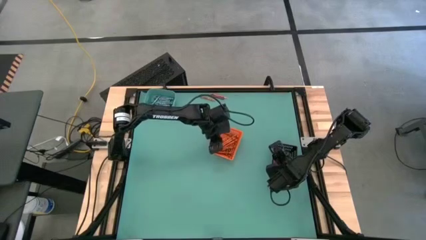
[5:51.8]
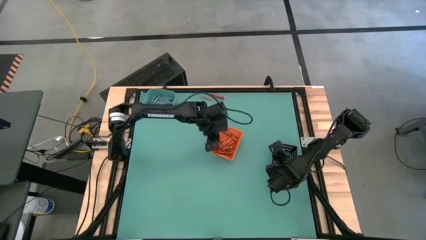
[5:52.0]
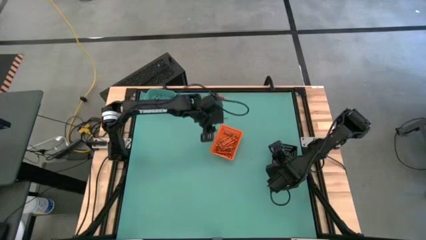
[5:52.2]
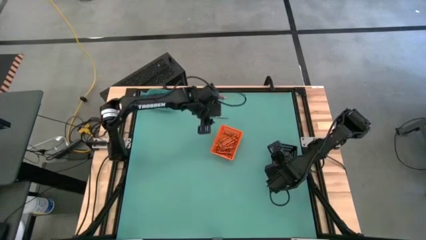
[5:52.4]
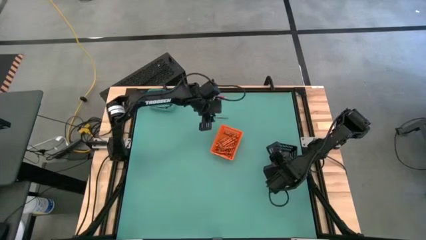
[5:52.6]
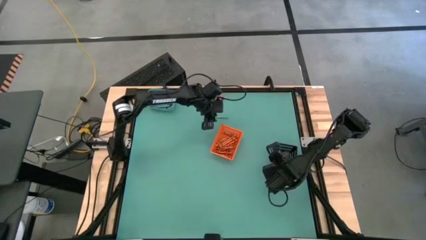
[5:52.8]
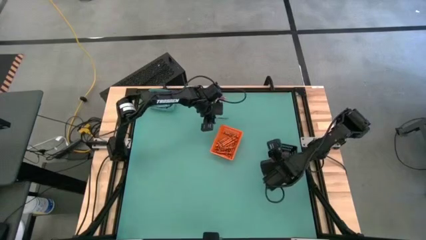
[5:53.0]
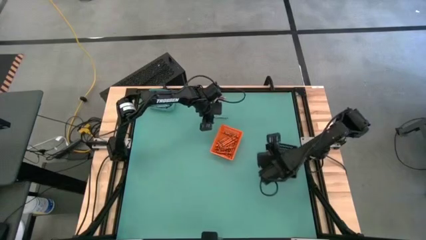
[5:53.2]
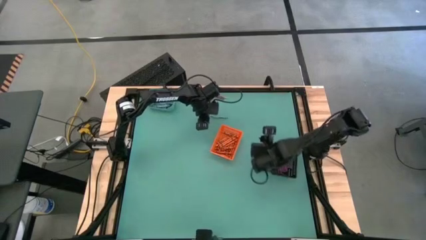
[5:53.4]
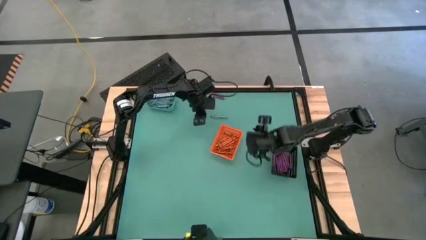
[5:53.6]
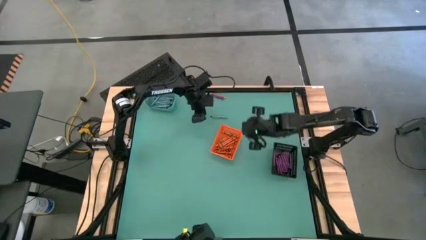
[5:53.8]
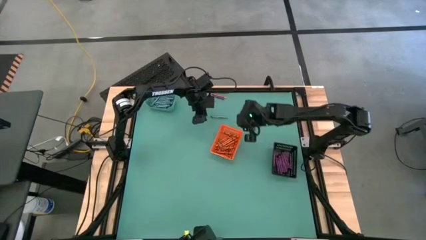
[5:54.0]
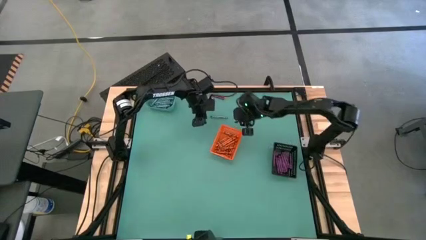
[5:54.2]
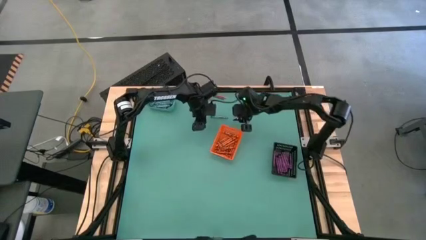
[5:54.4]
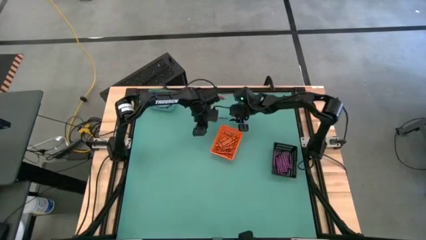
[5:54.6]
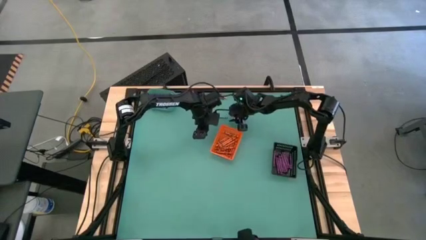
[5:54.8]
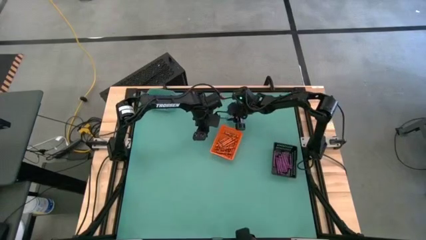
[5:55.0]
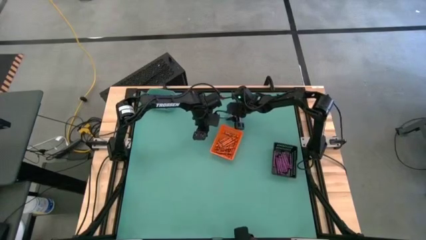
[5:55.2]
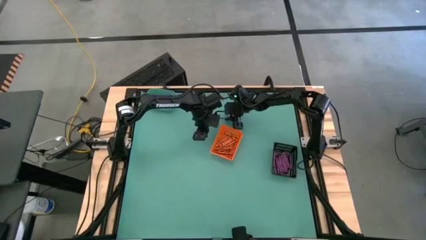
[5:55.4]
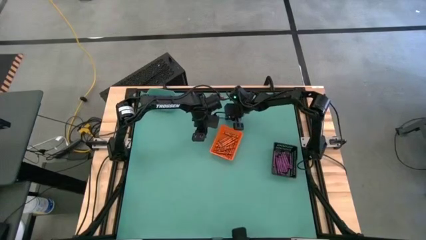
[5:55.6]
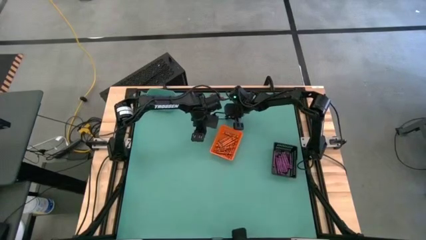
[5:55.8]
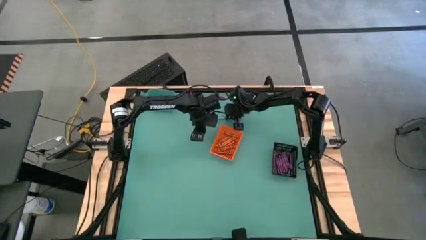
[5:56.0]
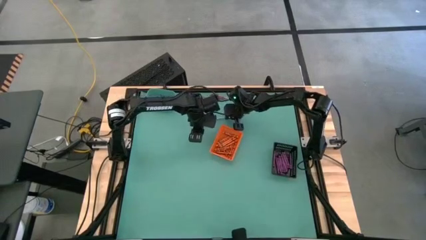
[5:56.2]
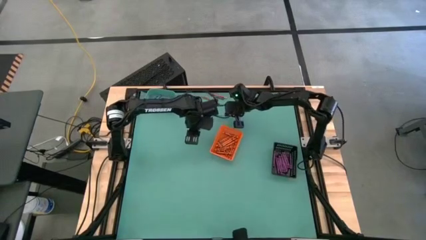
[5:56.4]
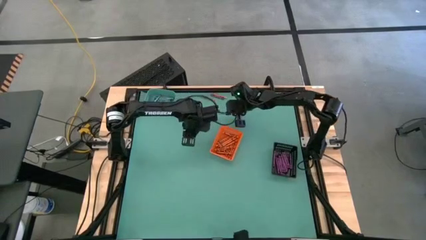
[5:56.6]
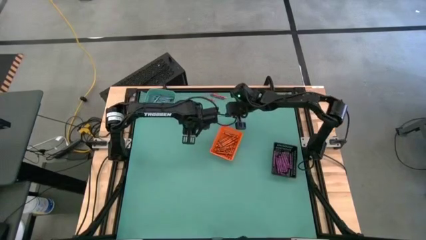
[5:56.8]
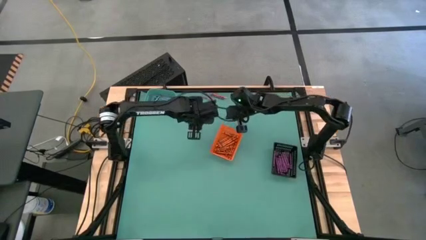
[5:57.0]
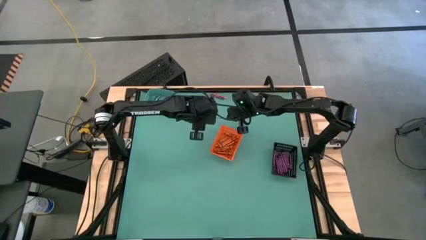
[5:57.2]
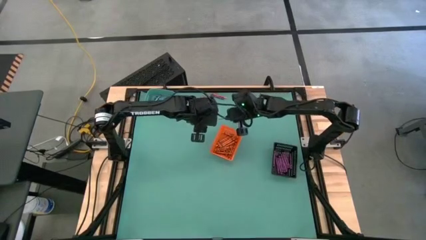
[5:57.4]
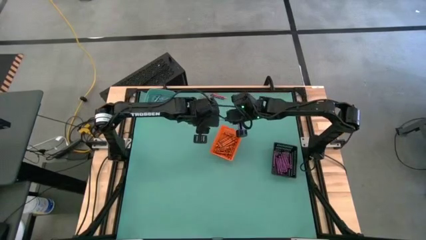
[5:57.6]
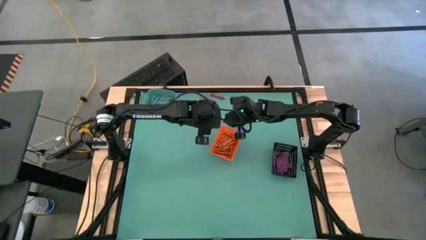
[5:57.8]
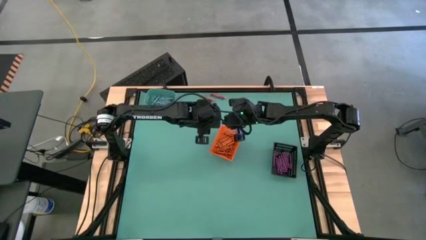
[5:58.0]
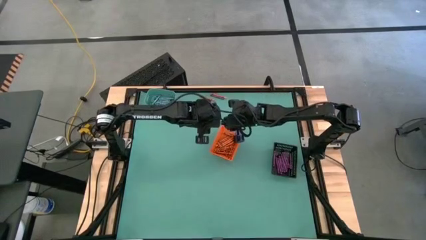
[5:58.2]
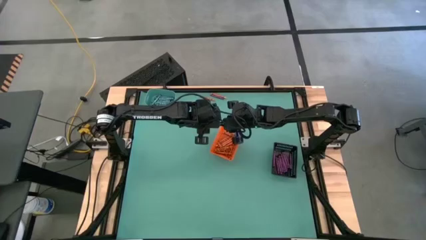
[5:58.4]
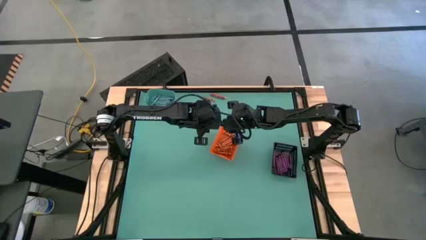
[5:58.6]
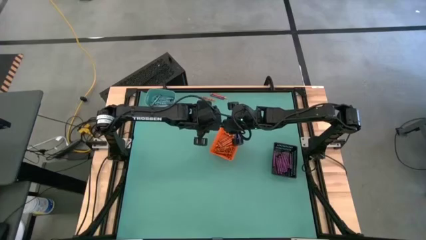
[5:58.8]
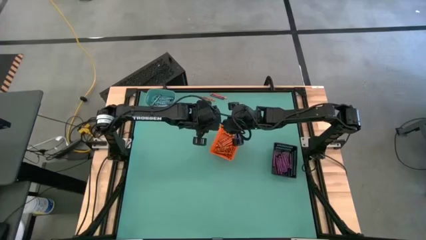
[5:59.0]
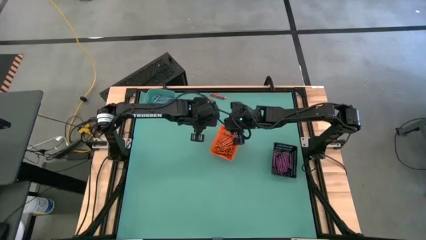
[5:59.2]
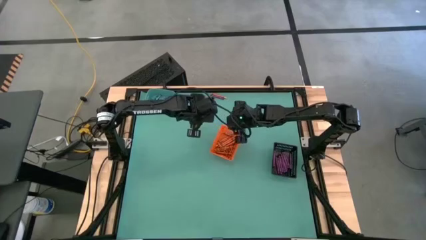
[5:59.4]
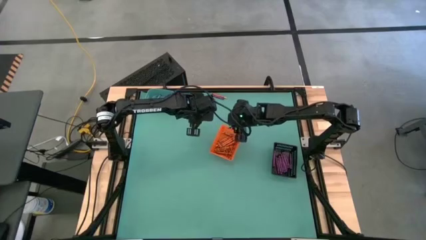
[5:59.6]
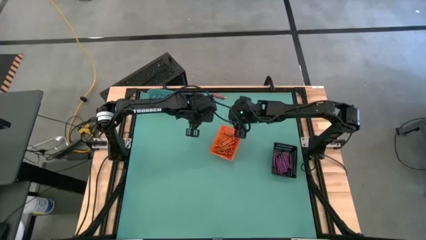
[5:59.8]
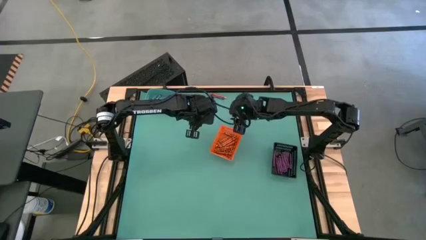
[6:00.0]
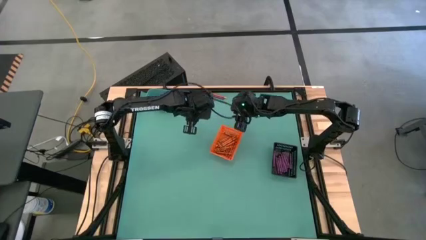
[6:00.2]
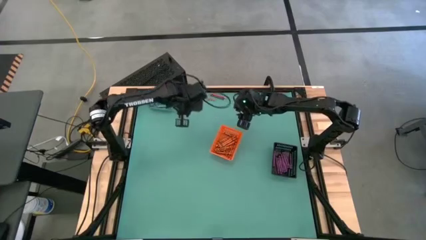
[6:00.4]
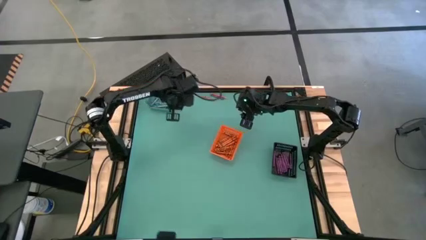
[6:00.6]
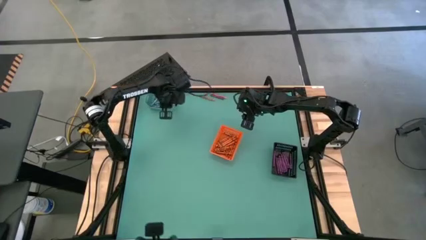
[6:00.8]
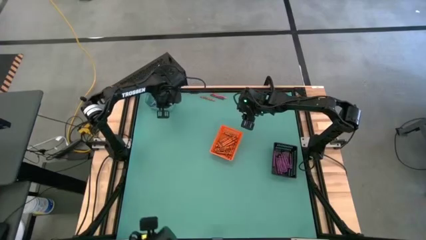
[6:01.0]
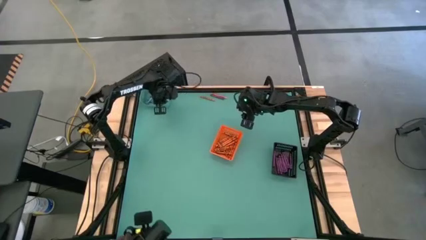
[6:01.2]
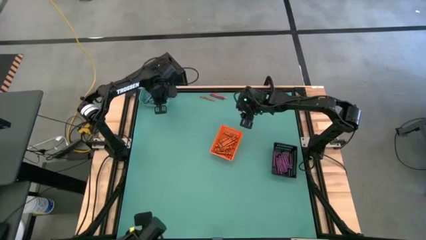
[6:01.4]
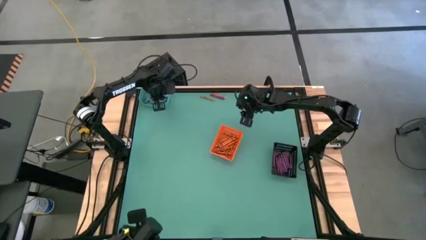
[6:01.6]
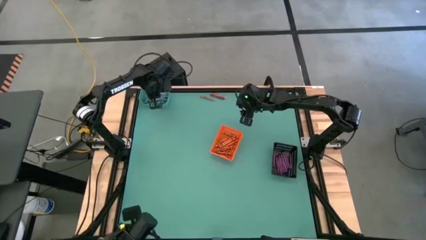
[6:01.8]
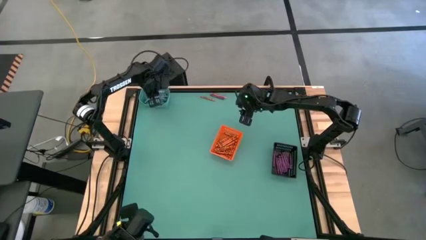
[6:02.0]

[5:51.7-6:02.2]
Task: Sort crayons
Put the blue crayon into the blue bin

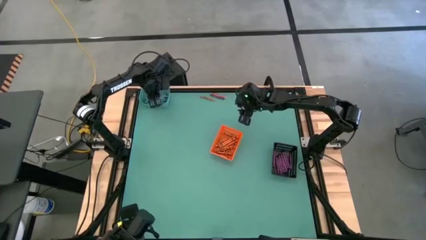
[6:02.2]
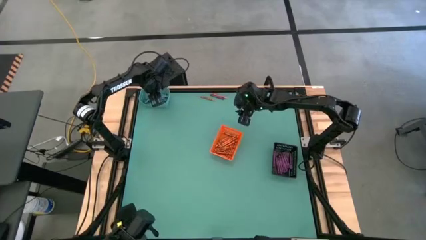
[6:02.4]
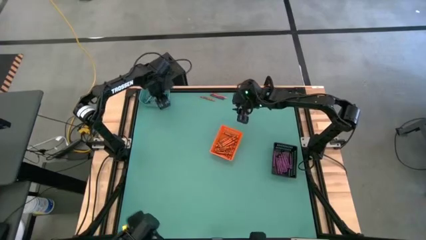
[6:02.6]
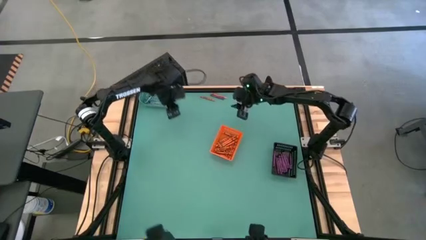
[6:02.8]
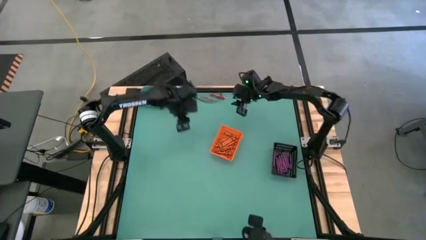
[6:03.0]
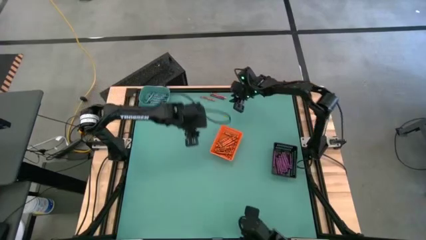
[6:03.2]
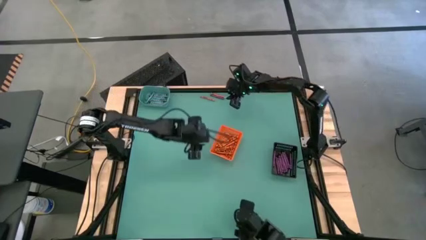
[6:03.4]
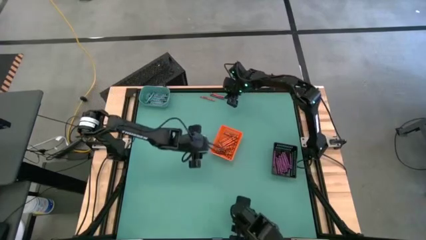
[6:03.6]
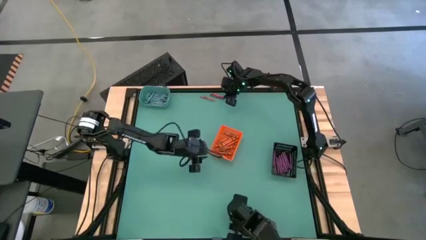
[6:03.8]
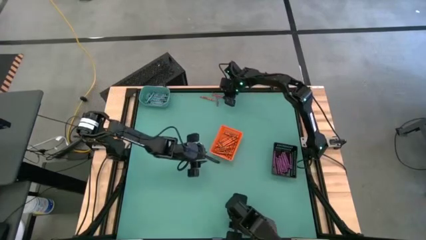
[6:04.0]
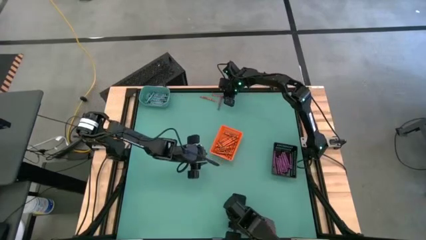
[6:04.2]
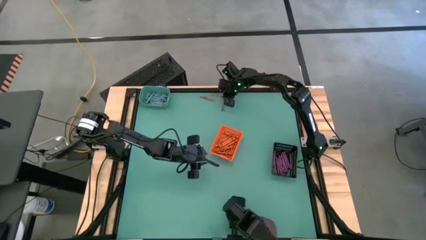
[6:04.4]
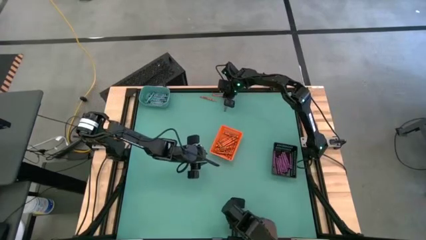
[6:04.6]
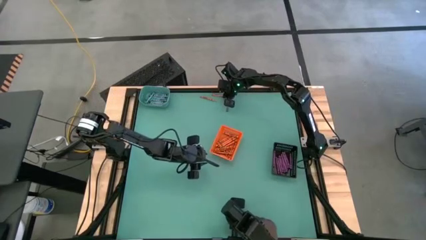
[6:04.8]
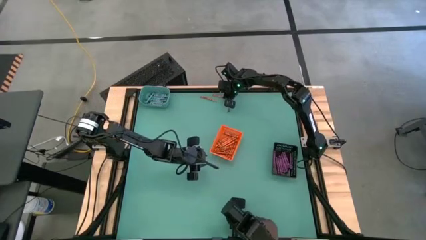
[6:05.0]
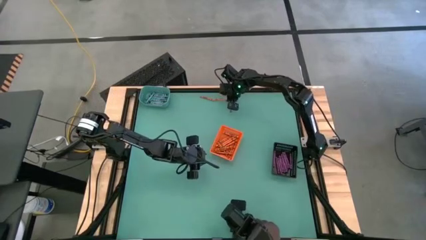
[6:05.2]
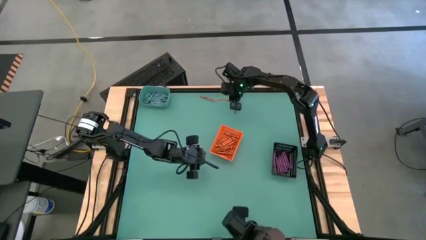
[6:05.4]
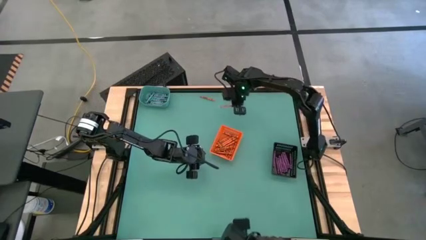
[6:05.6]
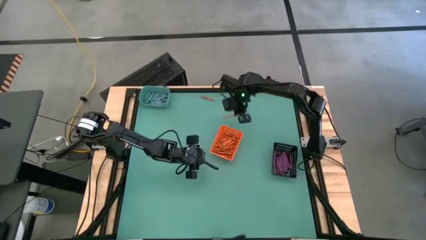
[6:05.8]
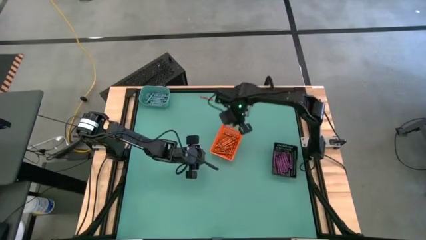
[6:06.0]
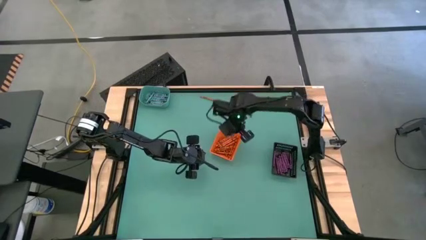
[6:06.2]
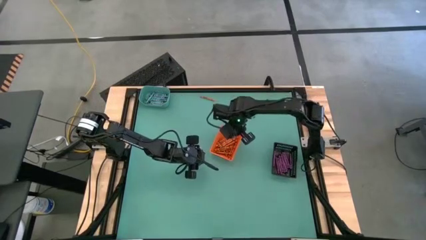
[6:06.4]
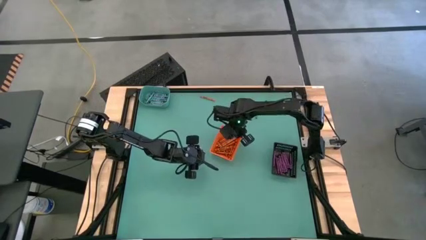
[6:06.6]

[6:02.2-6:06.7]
Put the orange crayon into the orange bin
